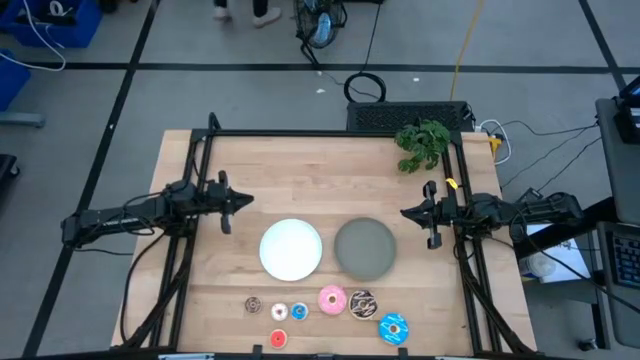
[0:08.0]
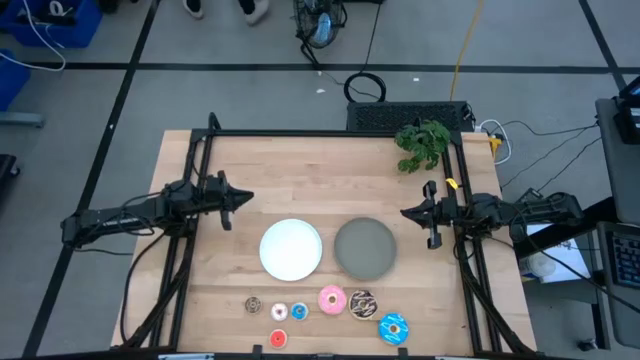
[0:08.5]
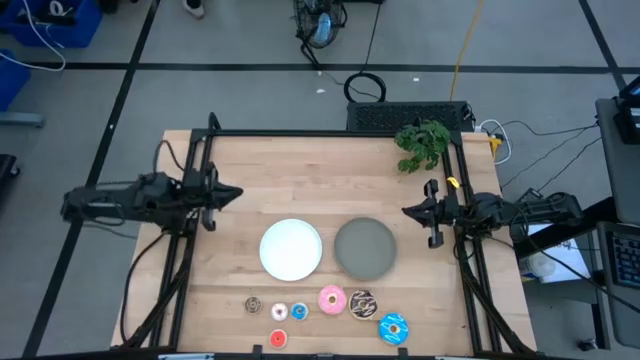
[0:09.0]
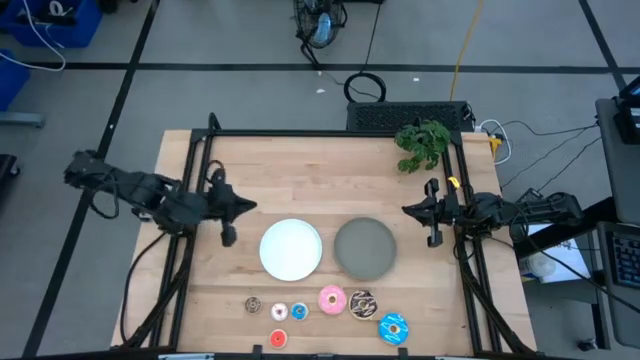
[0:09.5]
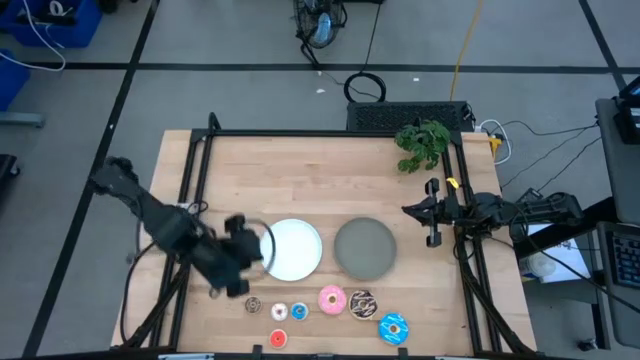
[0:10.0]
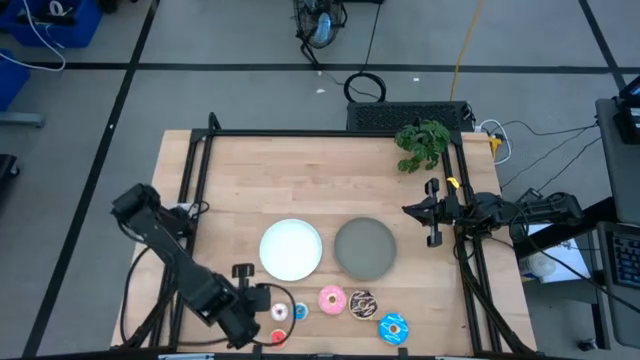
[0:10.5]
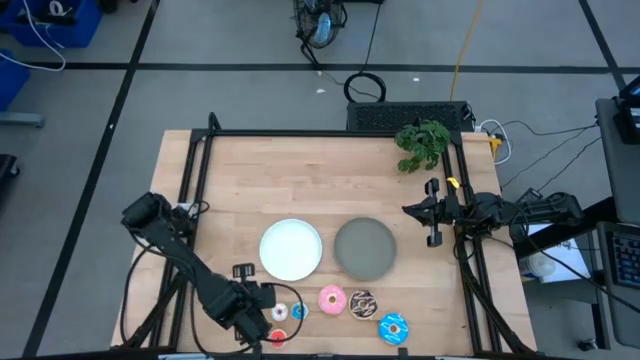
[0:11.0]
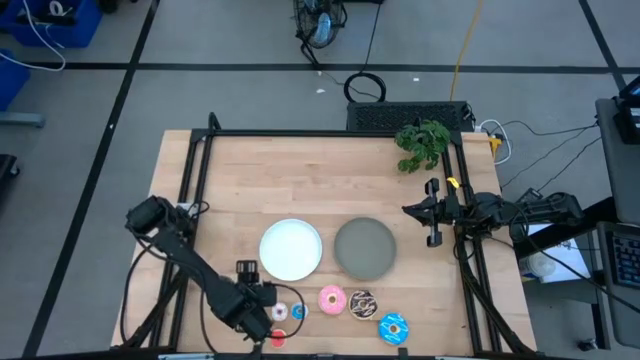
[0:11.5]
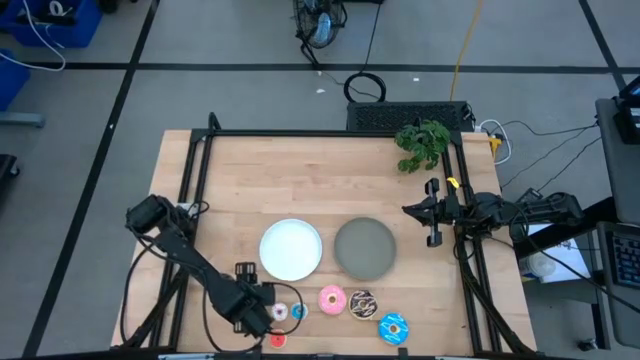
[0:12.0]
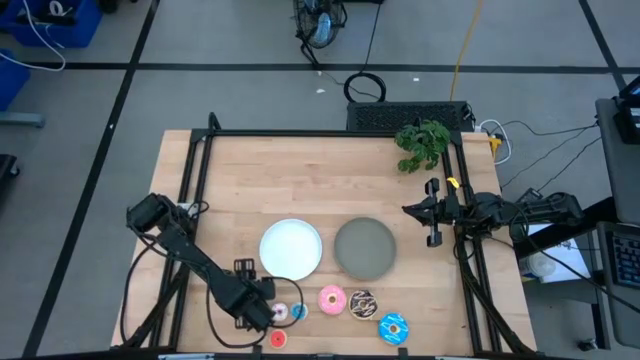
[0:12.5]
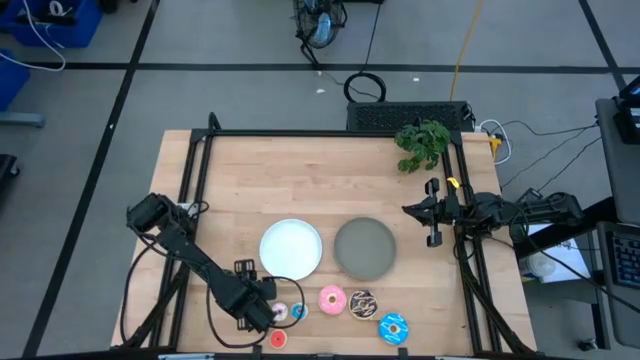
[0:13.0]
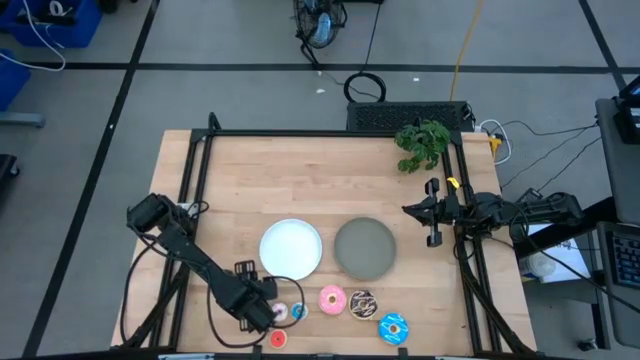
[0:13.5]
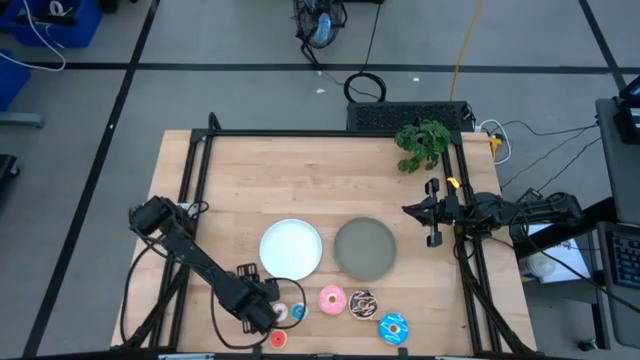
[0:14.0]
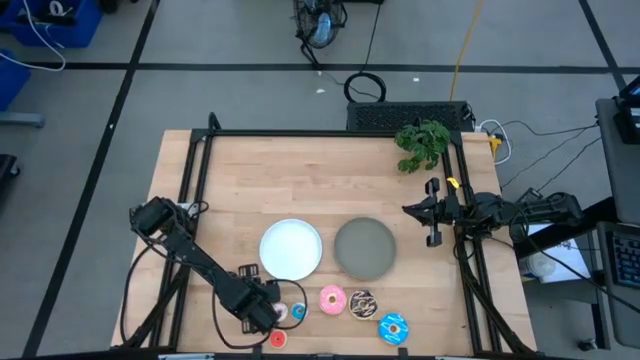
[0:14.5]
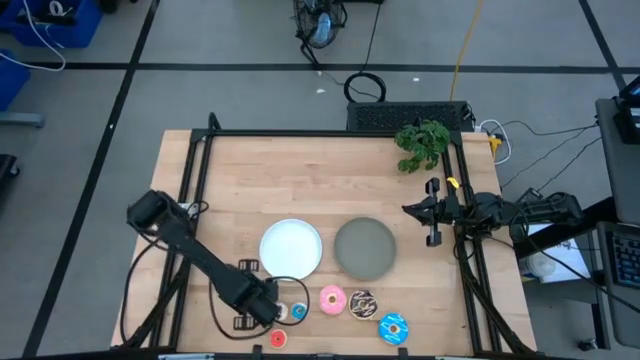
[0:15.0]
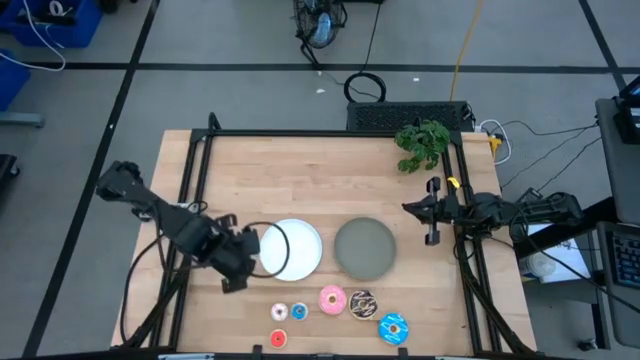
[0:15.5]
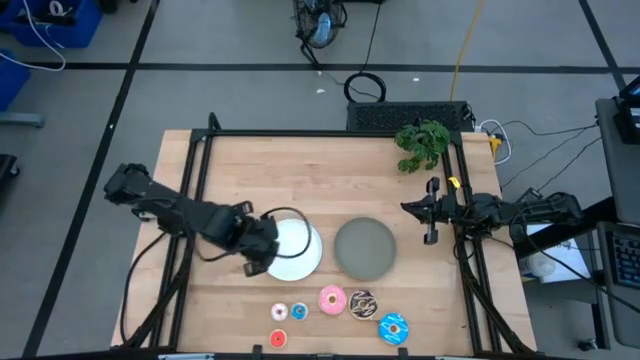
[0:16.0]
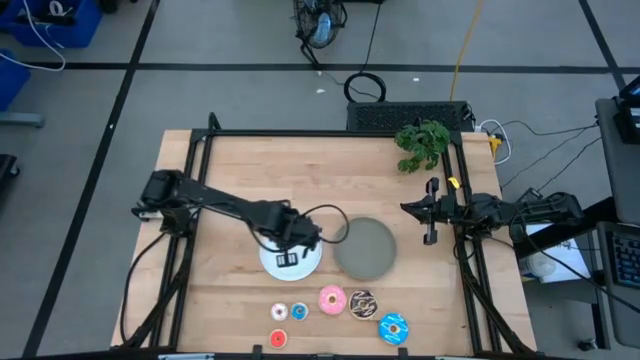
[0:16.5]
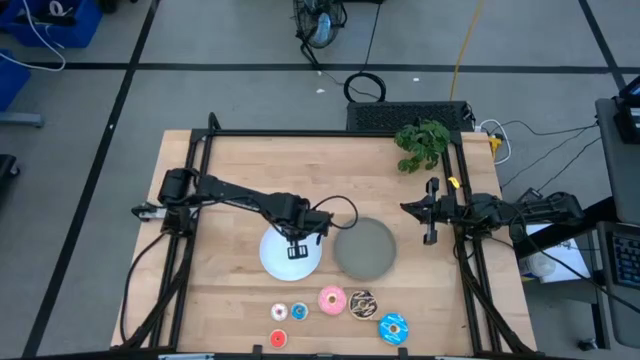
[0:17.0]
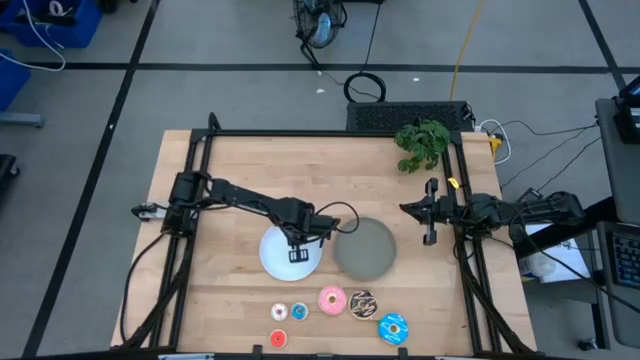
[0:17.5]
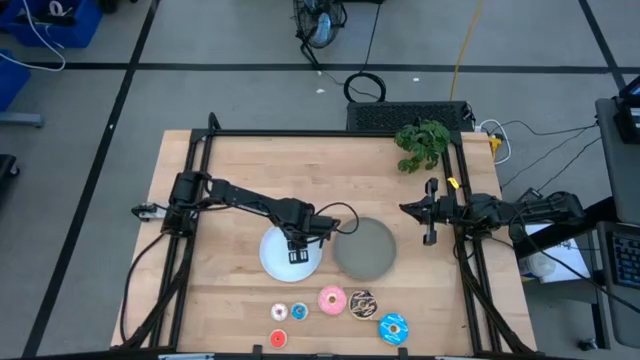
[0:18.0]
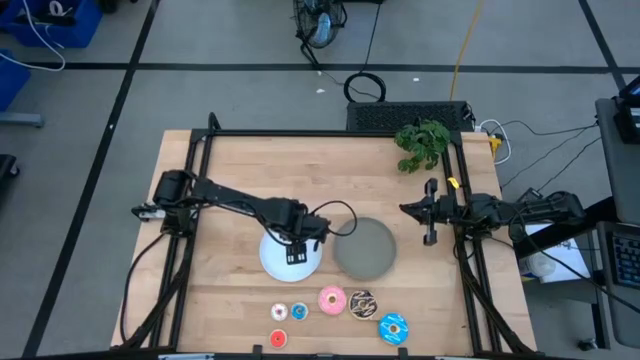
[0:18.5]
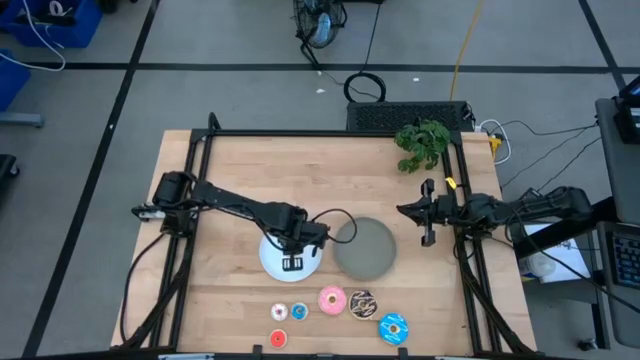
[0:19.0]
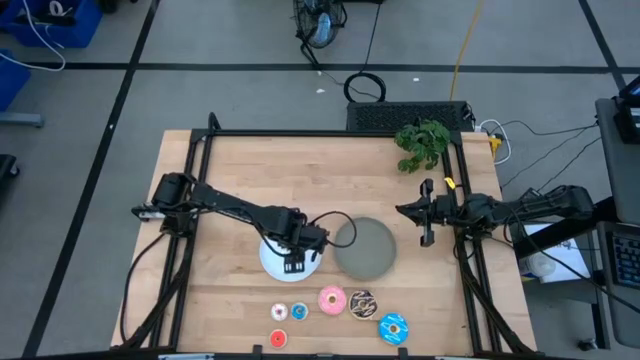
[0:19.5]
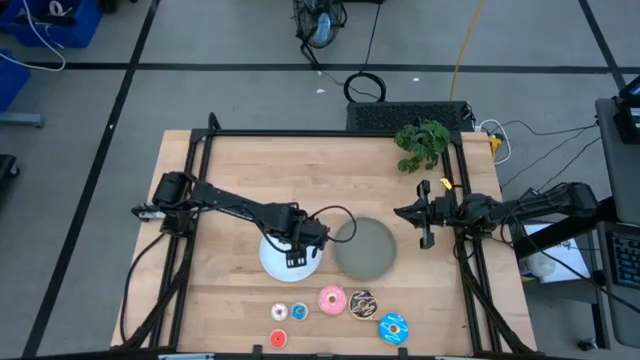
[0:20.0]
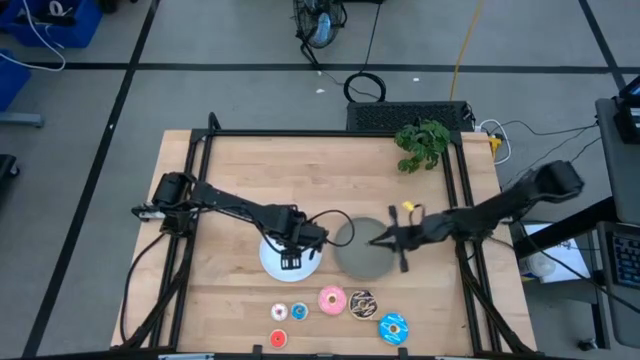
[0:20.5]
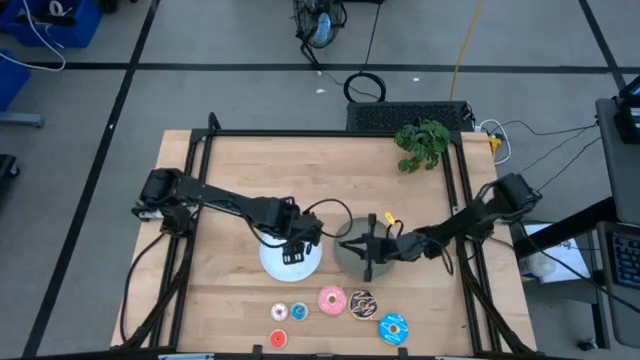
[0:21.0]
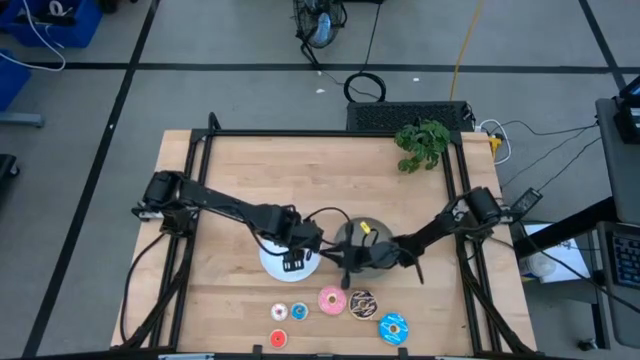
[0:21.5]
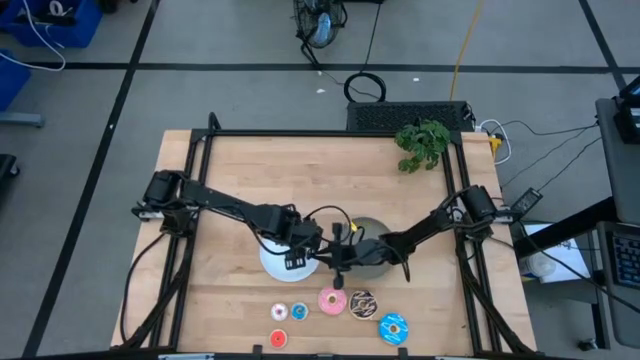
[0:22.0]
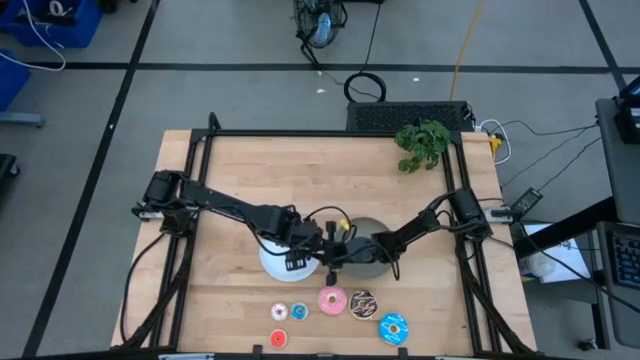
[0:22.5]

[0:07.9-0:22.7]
Task: Pick & Place donuts
Put the small brown donut on the white plate

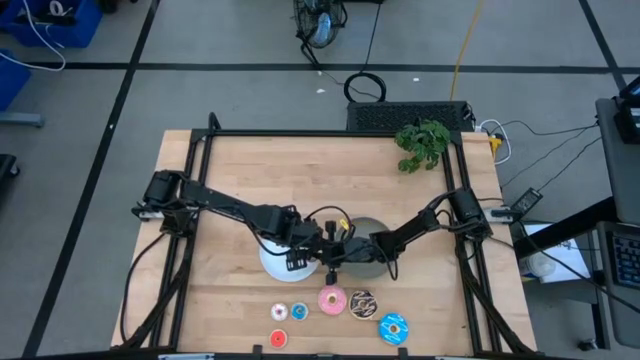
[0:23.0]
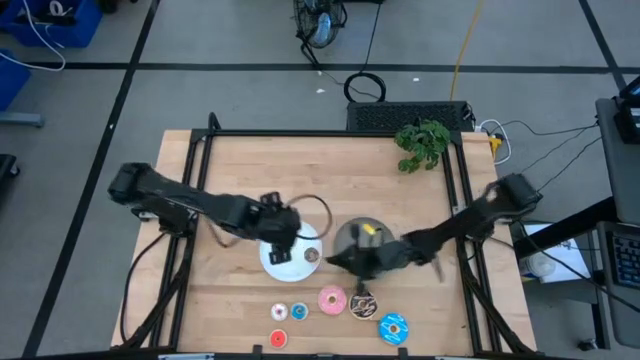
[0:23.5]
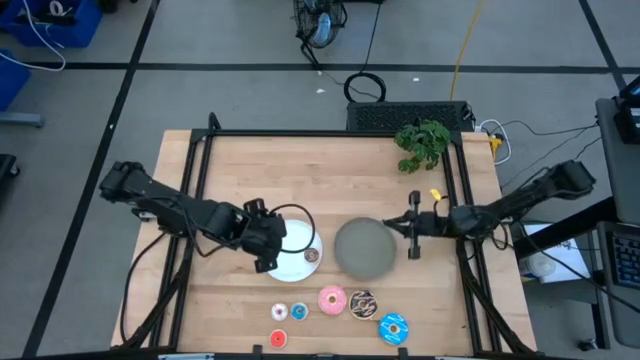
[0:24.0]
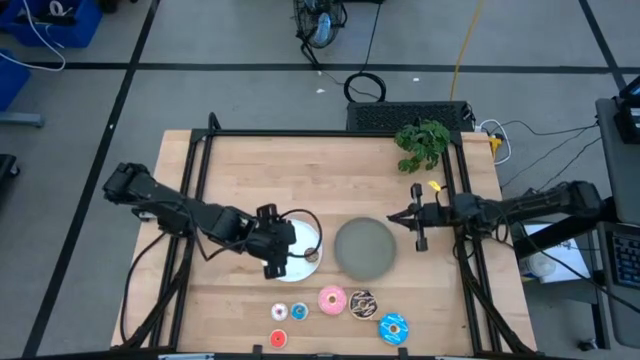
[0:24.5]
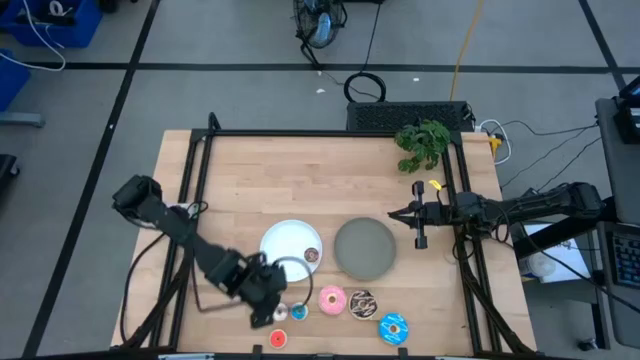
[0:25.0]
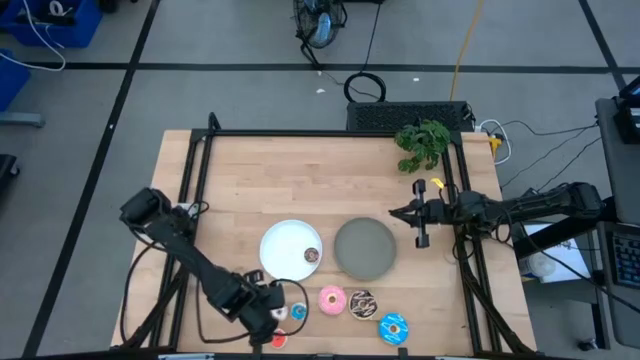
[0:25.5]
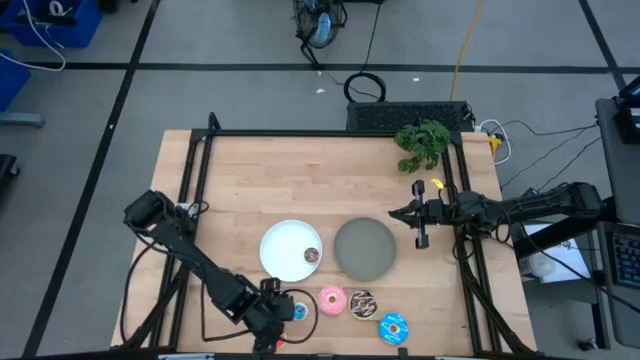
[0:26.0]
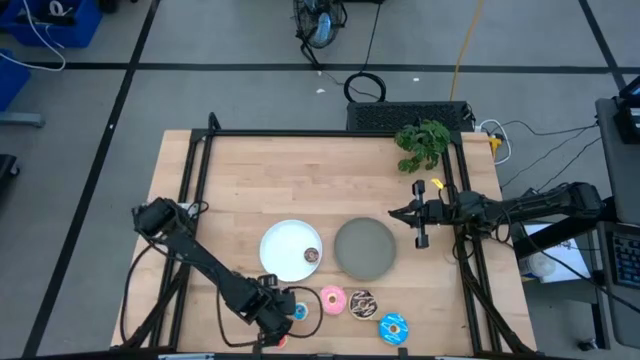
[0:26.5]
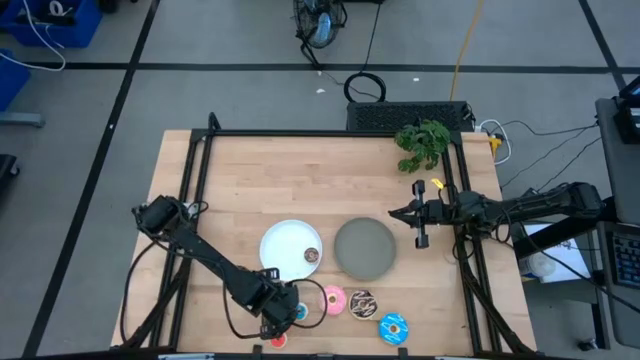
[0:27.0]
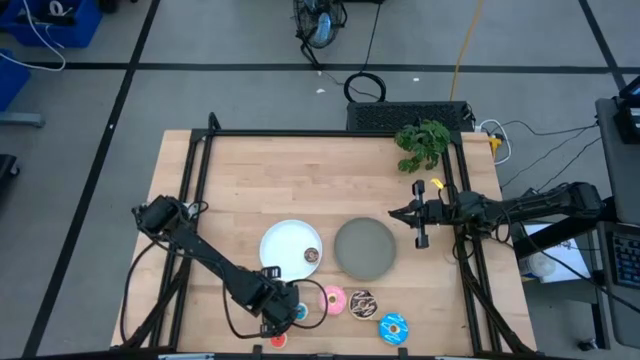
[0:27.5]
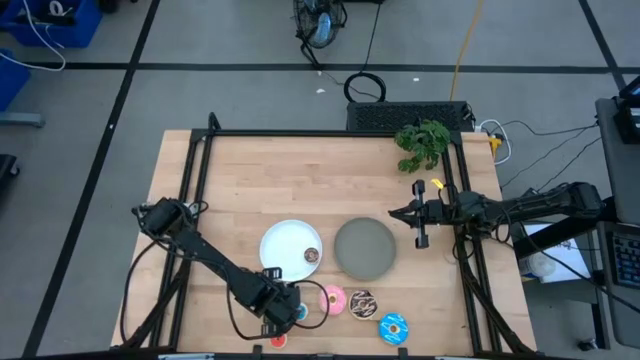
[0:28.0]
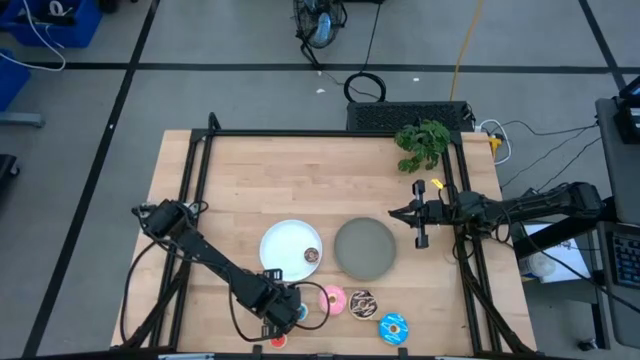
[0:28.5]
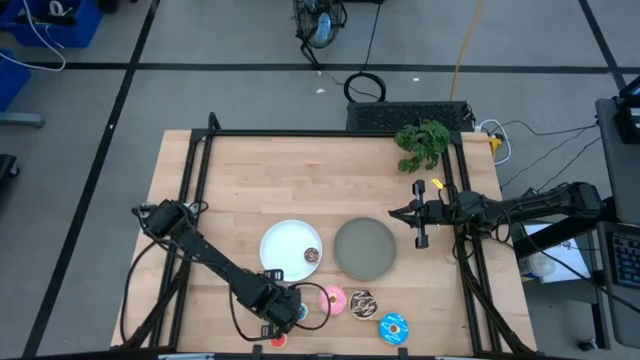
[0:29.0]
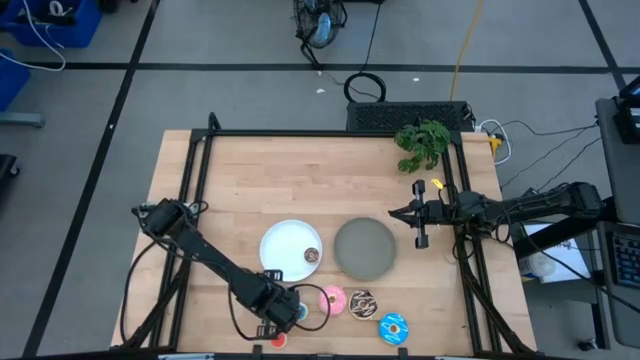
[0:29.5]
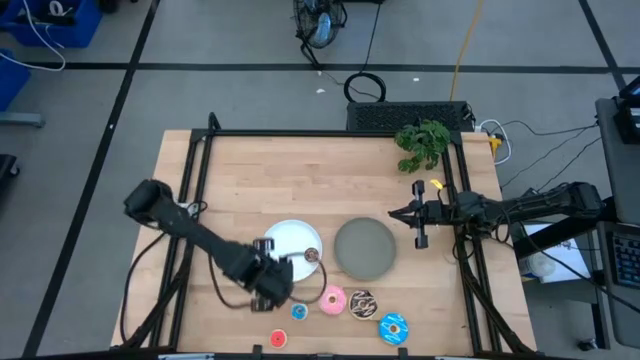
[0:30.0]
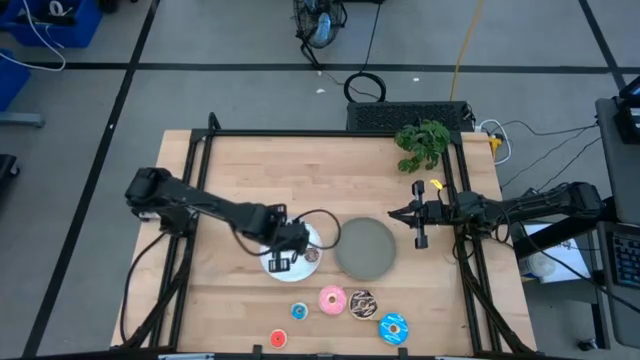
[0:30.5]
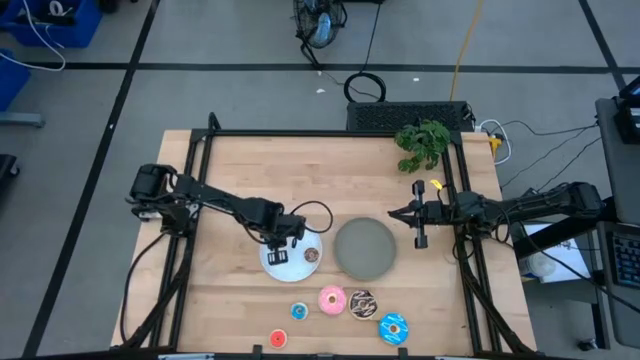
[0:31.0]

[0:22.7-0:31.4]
Put the small white donut on the white plate
